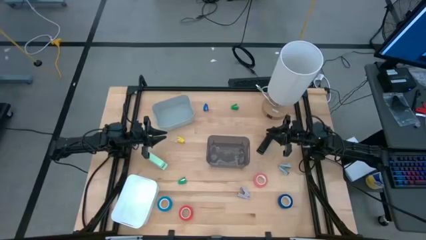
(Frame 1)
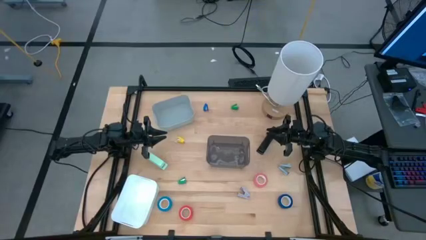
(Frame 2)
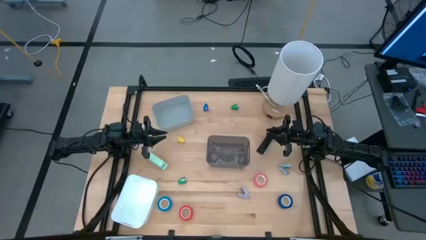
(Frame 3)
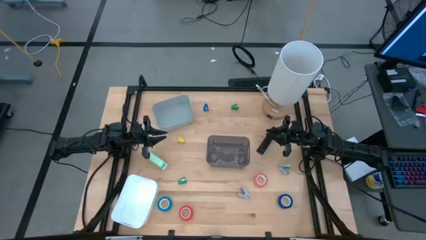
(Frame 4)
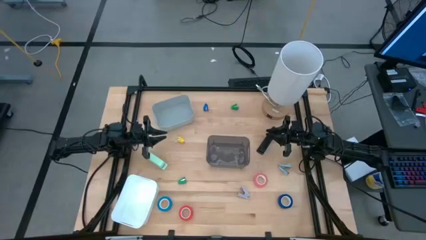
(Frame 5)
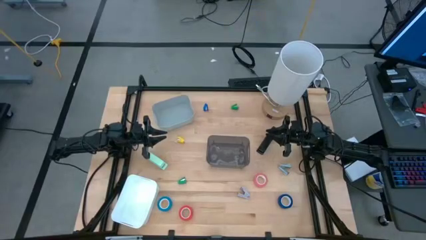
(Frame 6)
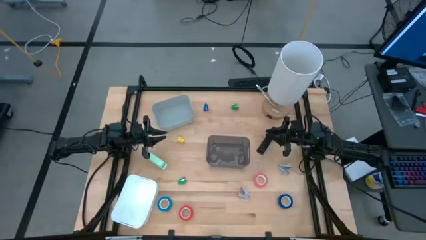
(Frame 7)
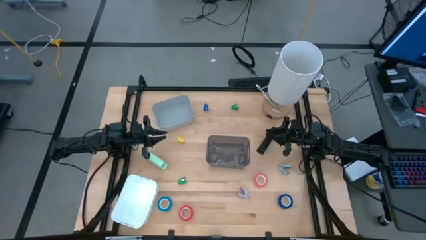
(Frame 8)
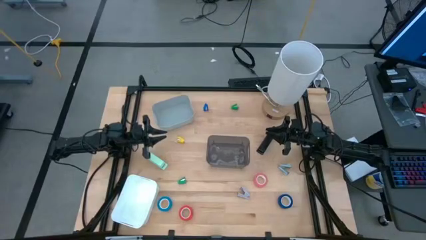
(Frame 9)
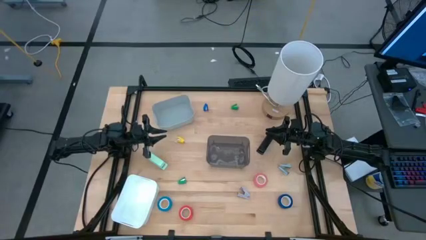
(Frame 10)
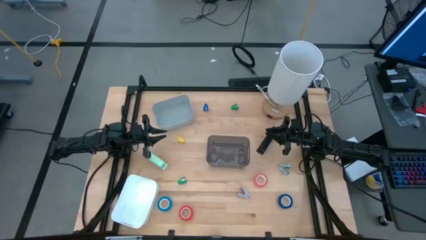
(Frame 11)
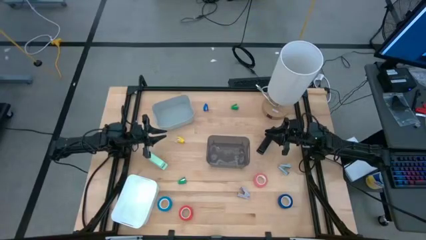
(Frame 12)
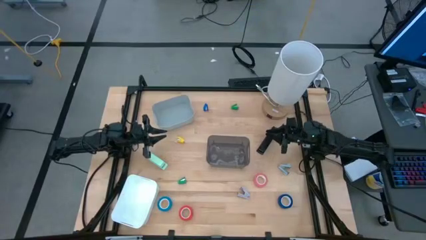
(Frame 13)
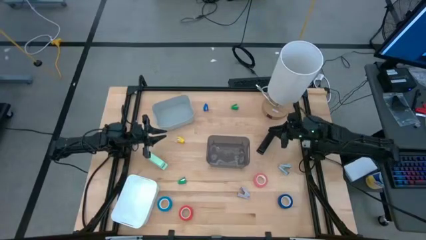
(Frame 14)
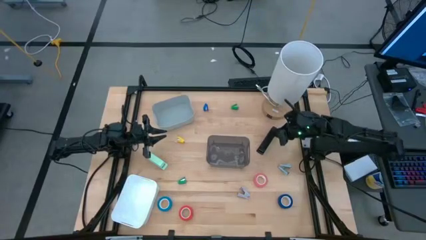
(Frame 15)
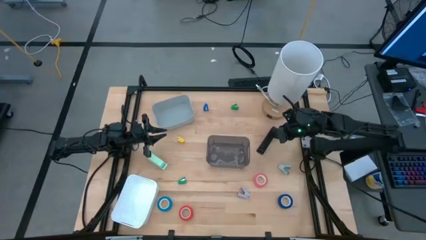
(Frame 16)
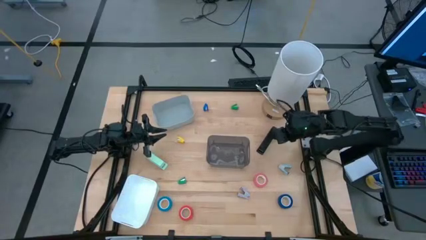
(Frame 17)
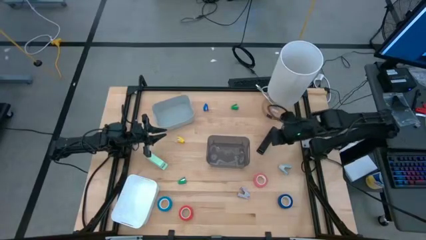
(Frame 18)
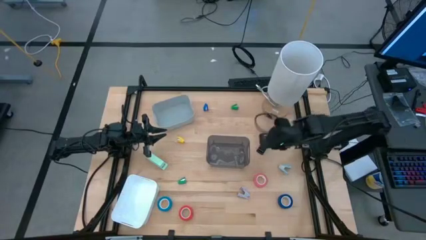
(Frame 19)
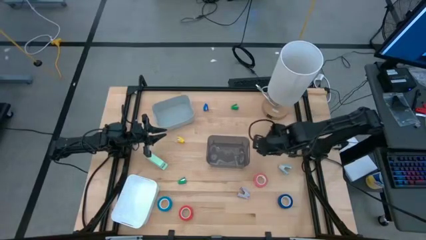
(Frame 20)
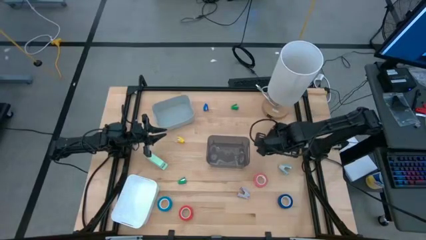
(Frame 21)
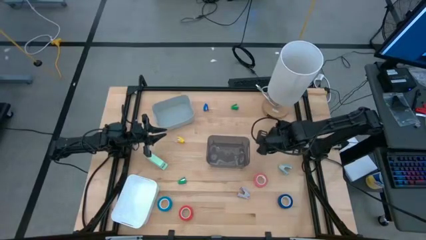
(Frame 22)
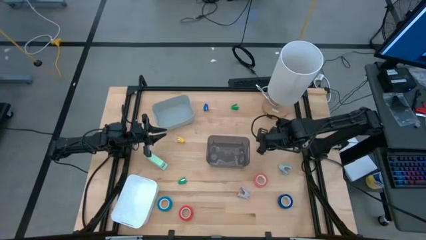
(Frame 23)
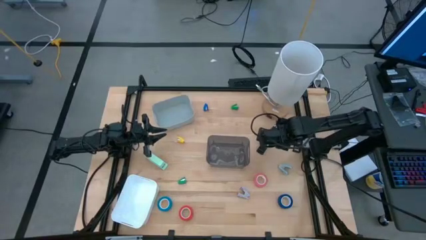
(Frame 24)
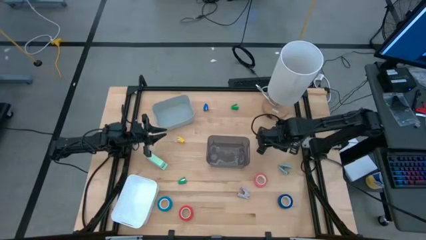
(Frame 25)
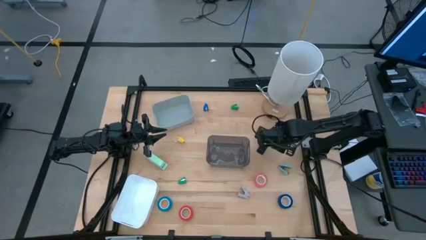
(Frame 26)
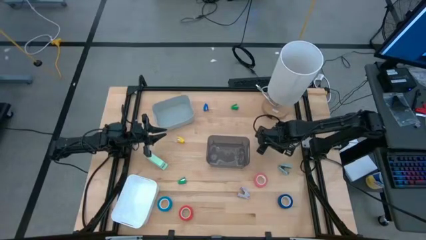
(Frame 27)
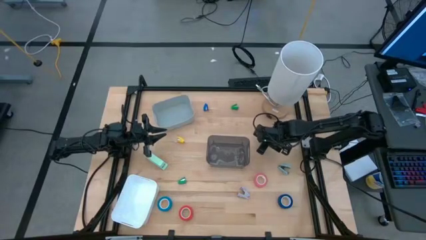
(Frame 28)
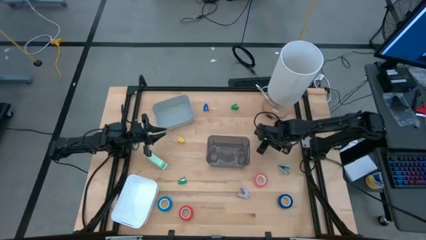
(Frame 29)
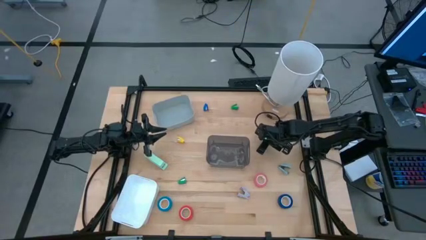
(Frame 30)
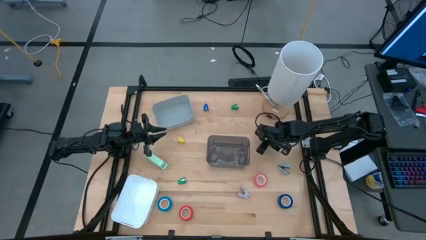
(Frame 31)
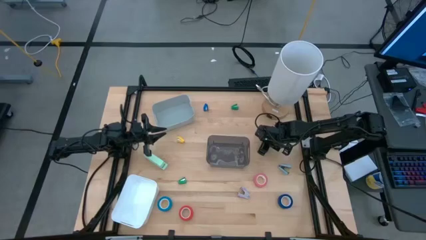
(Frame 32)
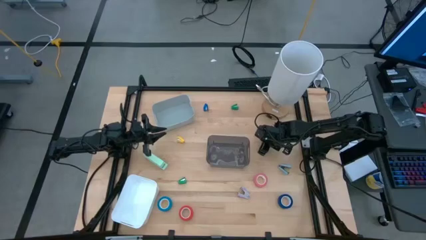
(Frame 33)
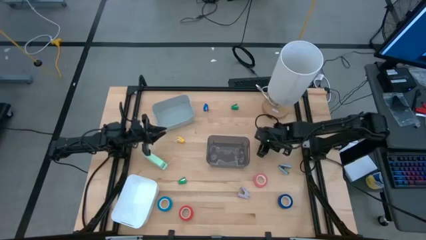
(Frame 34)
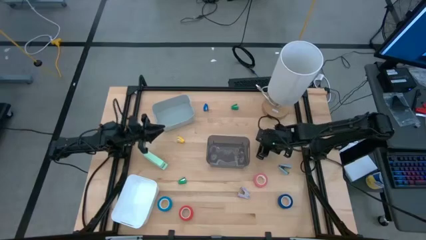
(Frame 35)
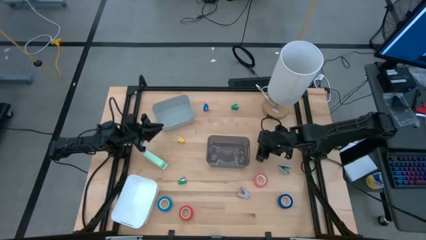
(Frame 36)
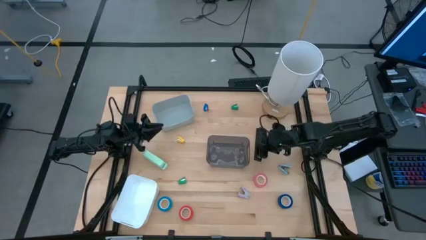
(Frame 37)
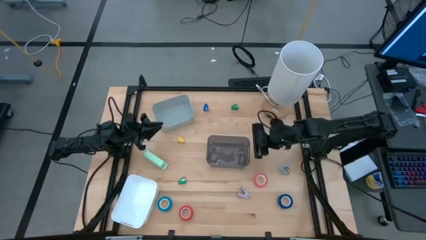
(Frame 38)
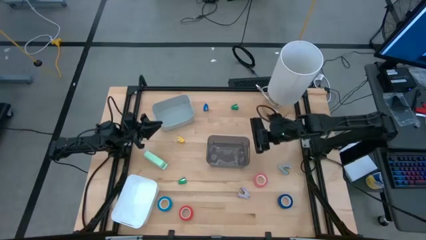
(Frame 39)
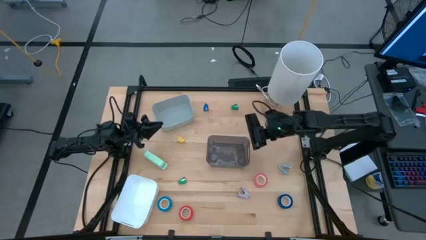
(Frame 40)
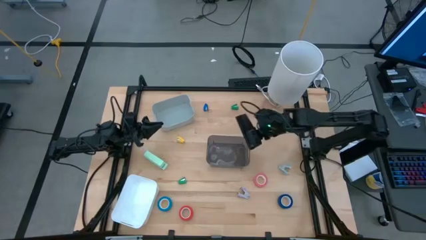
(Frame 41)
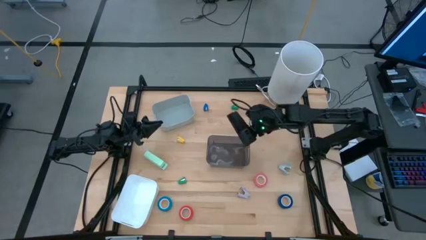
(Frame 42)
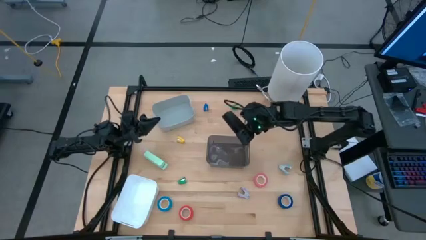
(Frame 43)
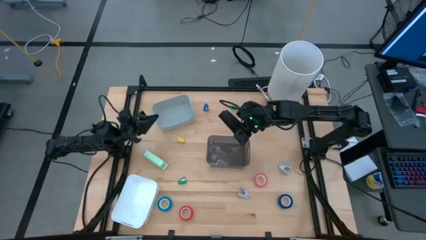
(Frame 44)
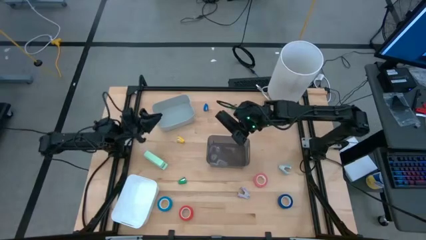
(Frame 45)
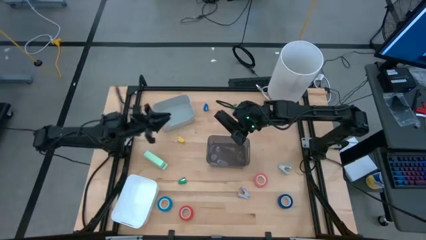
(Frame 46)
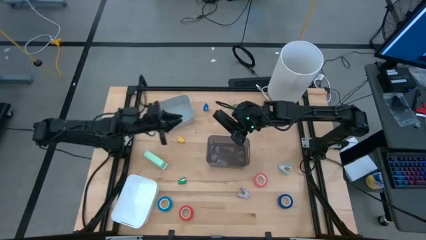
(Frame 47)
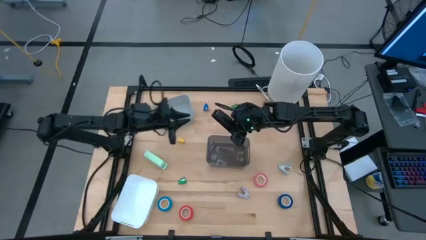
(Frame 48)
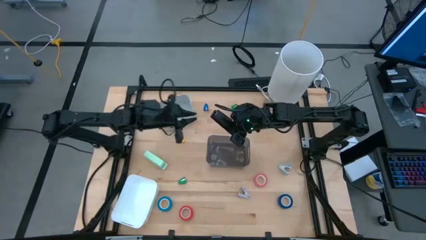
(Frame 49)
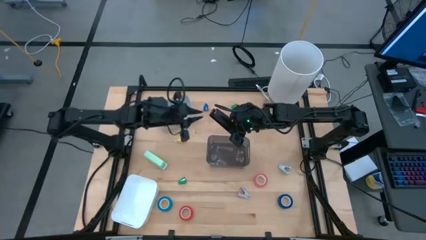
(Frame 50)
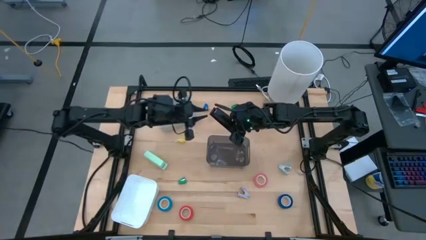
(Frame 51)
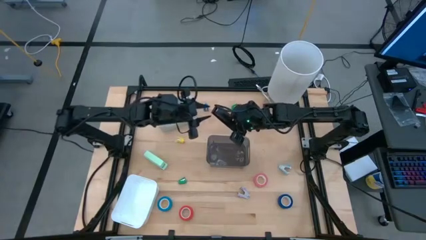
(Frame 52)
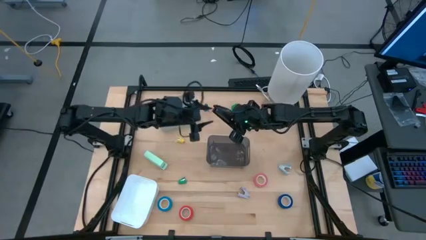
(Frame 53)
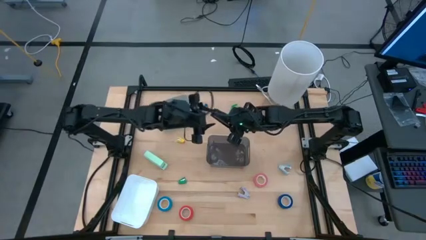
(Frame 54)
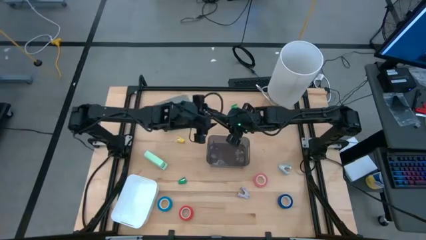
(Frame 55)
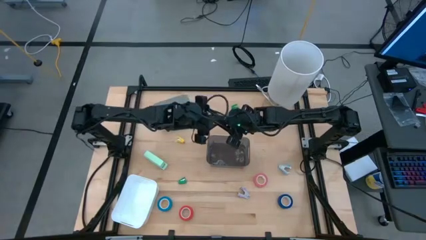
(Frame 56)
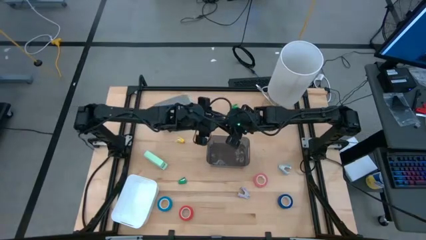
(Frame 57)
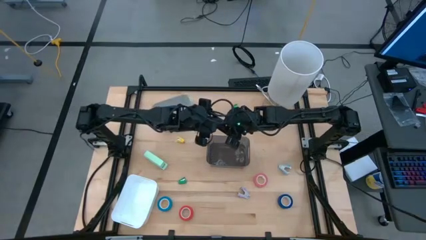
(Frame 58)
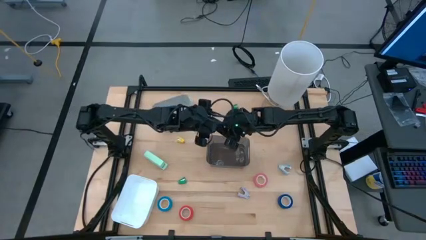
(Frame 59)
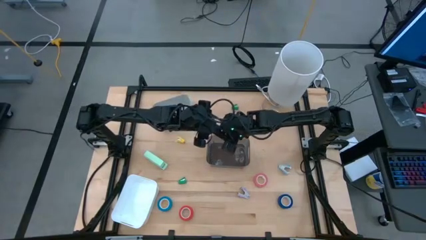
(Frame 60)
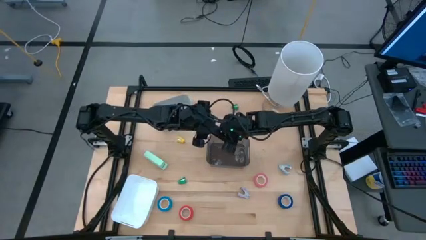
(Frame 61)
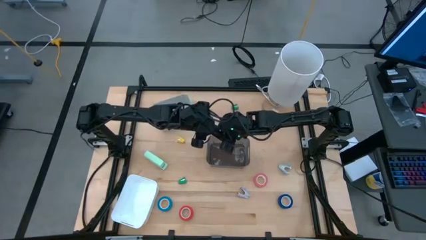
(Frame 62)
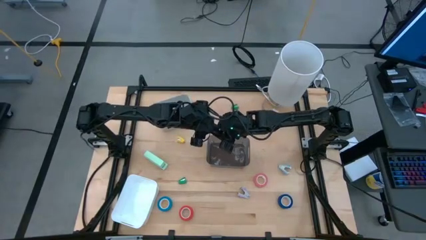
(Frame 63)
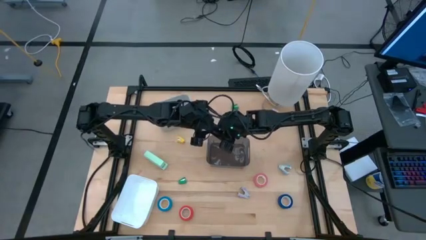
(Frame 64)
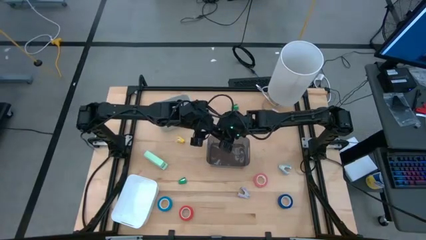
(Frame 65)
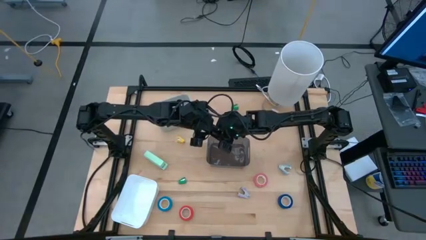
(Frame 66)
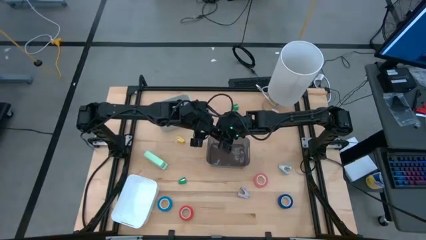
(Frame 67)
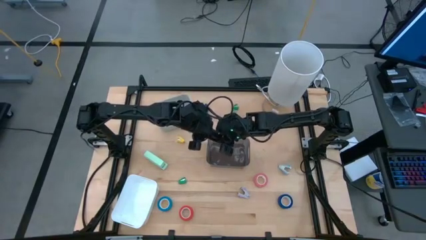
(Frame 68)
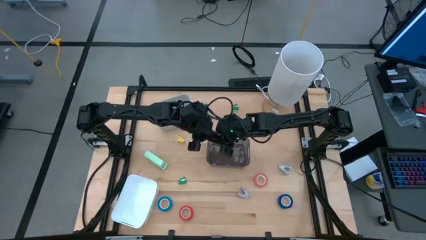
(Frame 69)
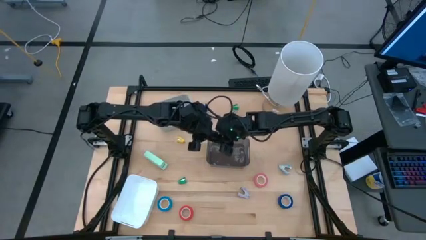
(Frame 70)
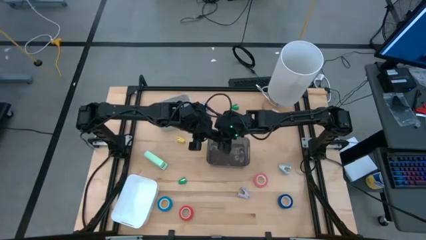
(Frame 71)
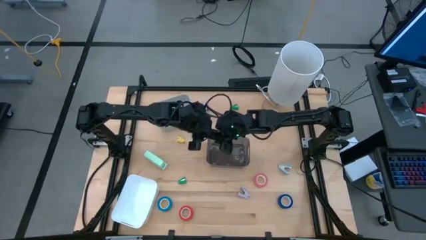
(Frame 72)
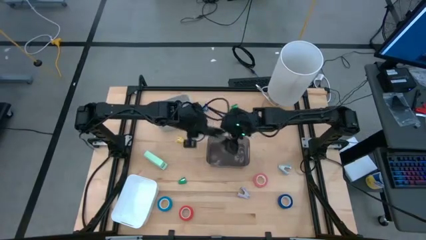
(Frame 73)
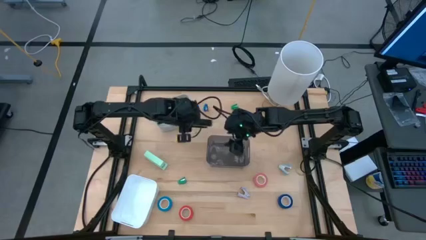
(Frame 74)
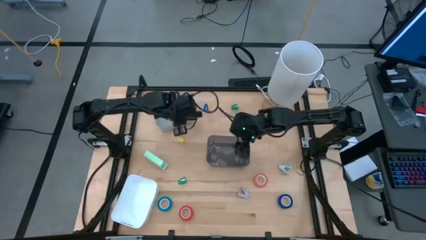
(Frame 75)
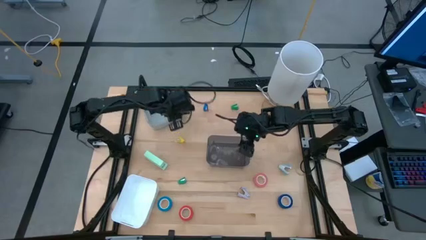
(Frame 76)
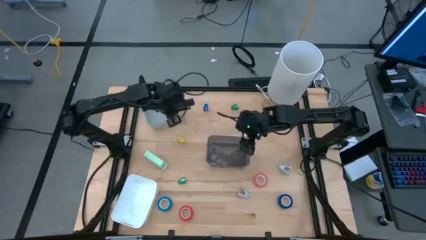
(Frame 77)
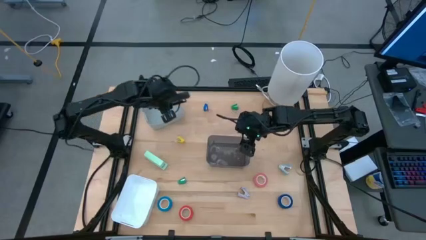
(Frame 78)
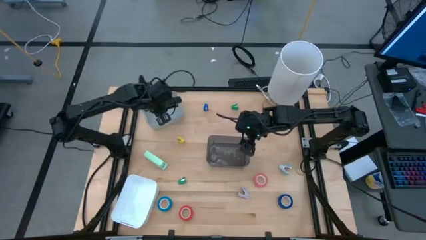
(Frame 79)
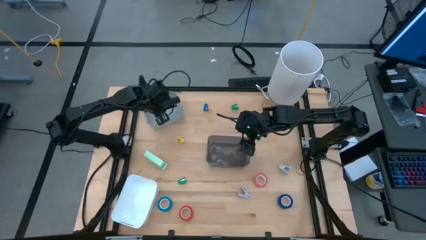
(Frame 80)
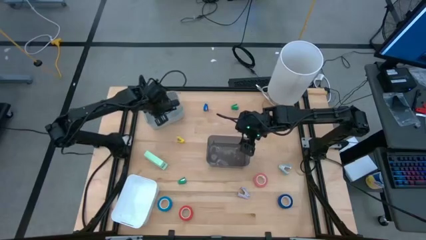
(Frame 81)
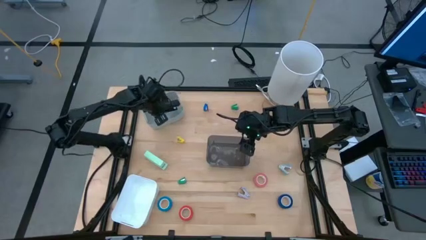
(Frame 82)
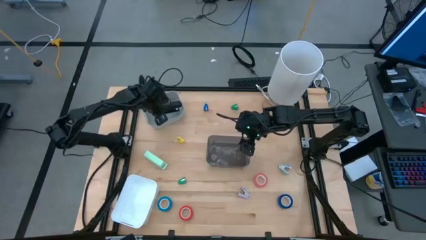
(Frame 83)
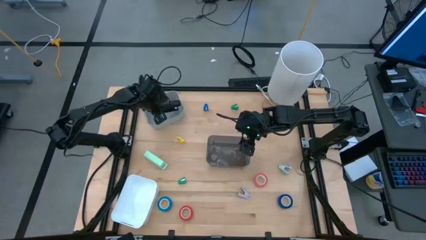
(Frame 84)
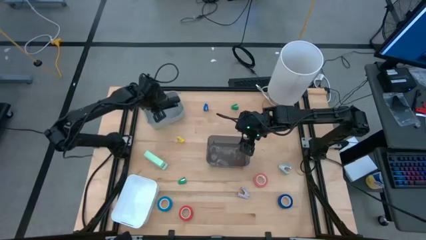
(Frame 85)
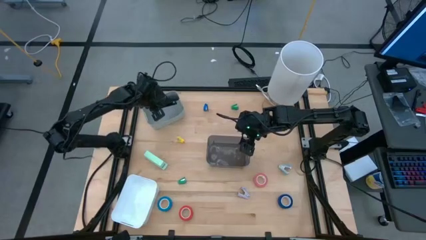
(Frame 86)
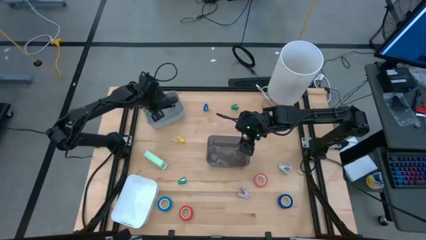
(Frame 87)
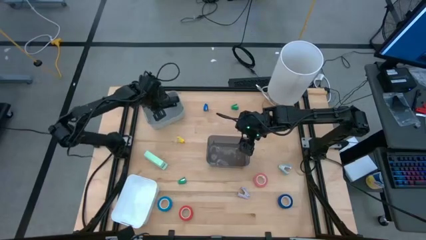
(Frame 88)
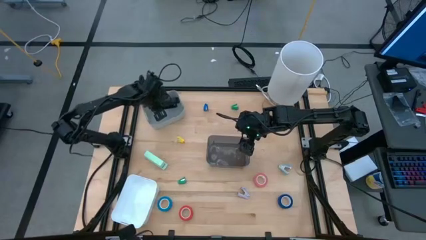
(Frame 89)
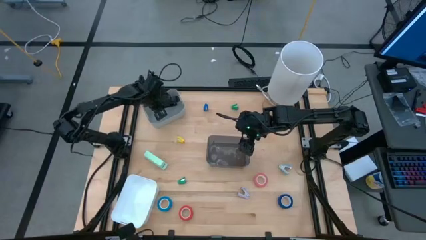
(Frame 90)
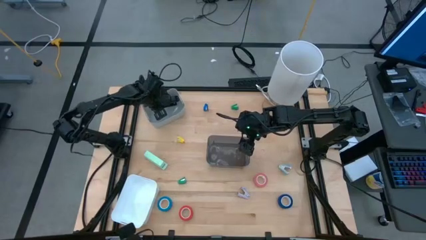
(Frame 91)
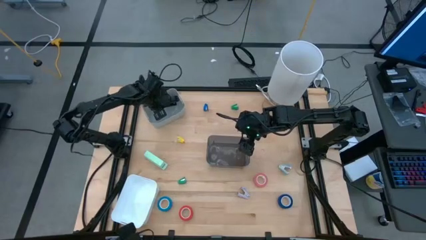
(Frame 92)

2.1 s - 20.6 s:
Task: Pick and place Stapler, Stapler remover, tape
Put the black stapler into the gray bin
